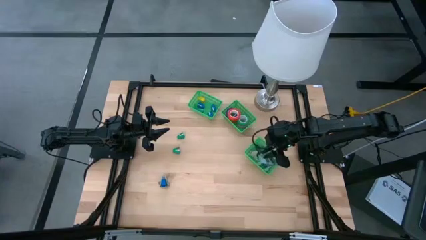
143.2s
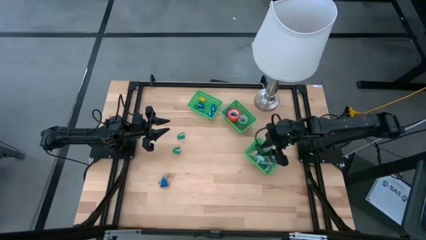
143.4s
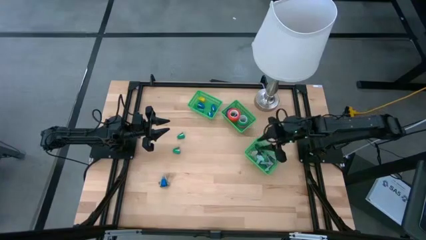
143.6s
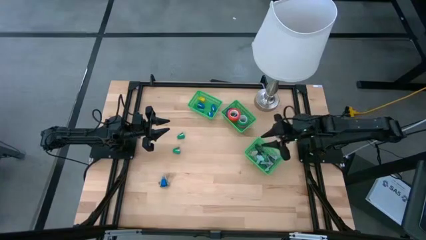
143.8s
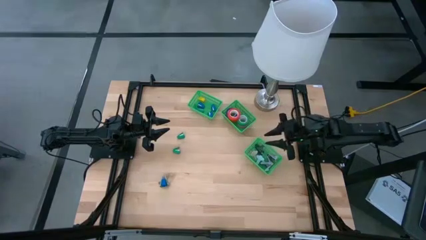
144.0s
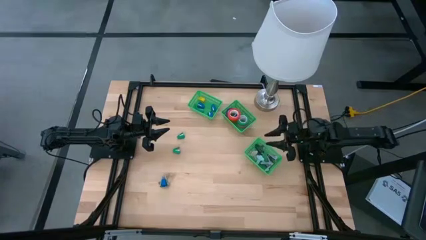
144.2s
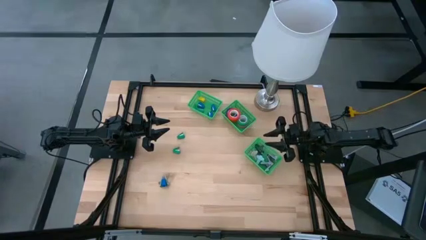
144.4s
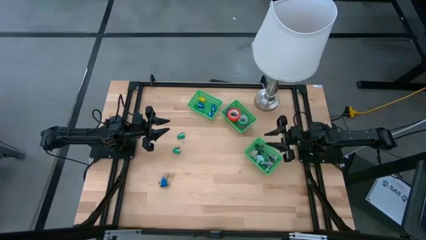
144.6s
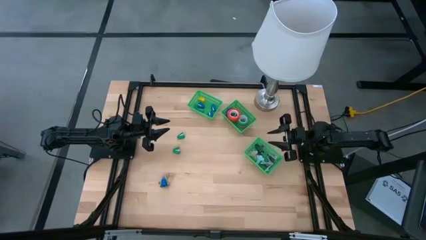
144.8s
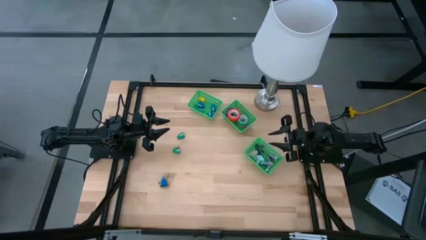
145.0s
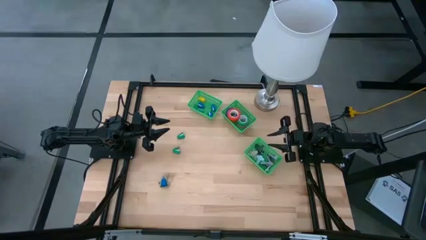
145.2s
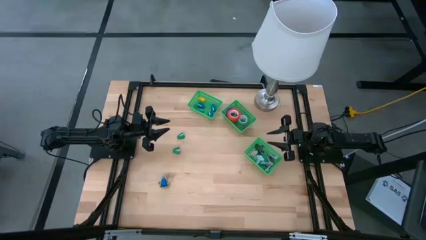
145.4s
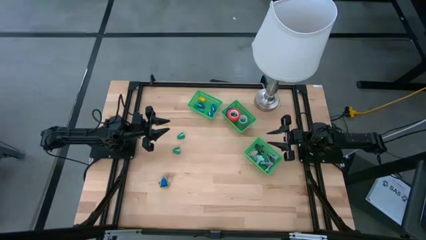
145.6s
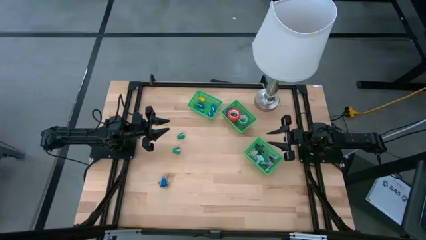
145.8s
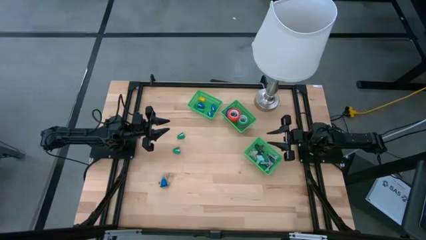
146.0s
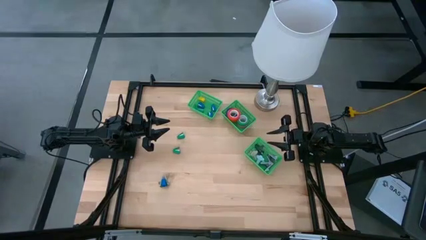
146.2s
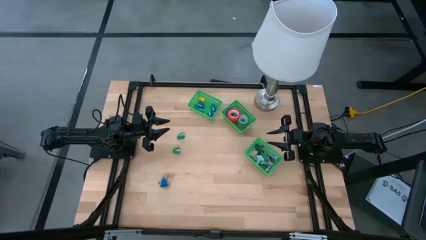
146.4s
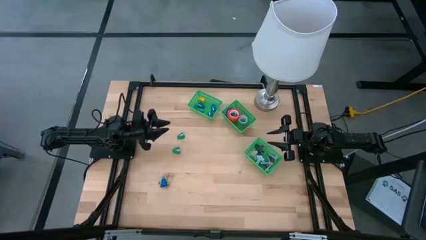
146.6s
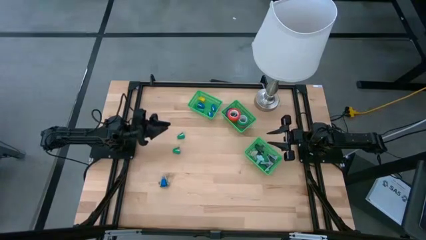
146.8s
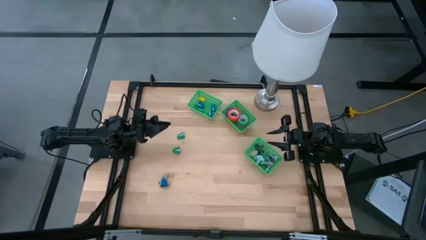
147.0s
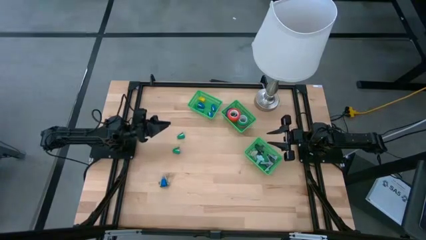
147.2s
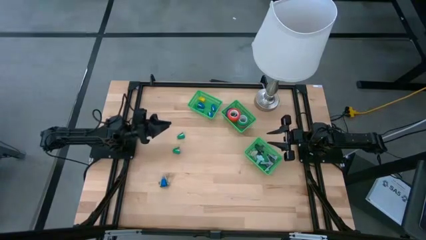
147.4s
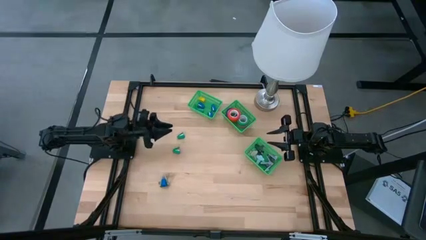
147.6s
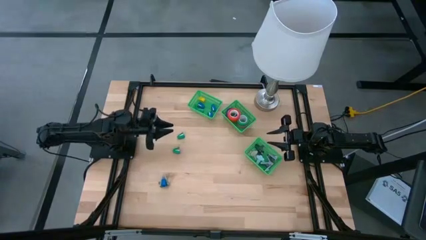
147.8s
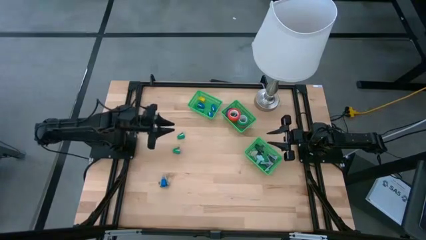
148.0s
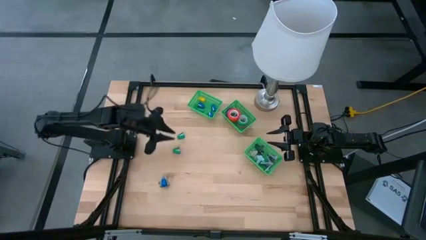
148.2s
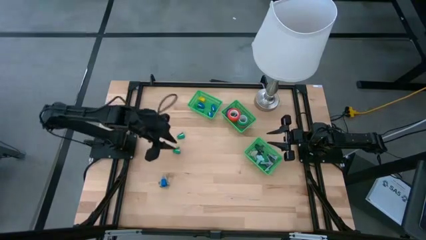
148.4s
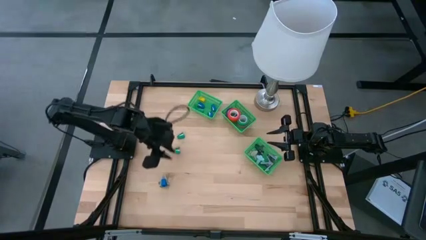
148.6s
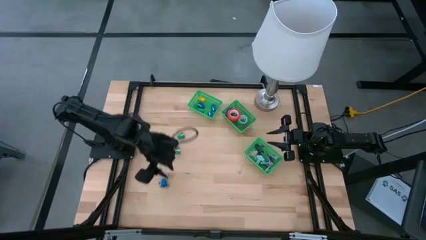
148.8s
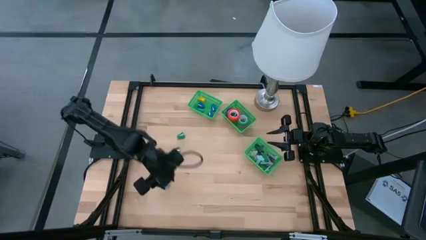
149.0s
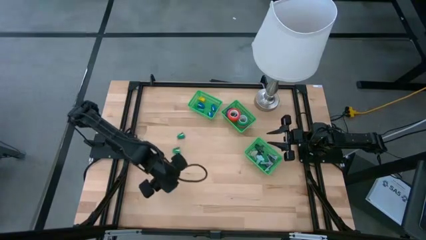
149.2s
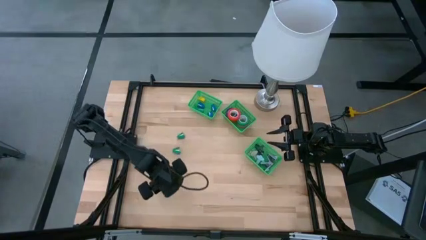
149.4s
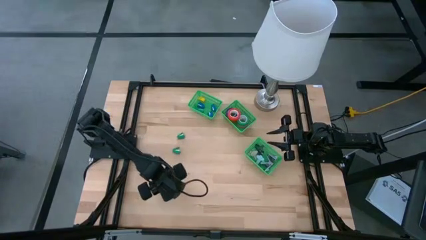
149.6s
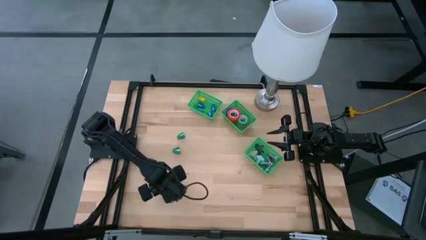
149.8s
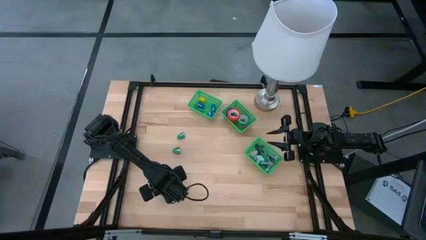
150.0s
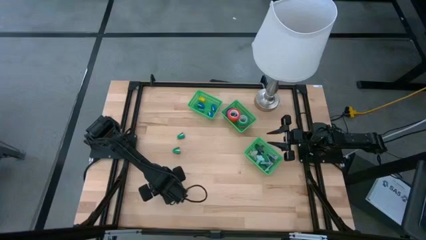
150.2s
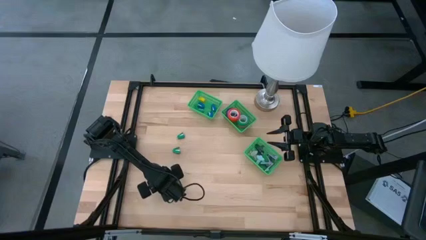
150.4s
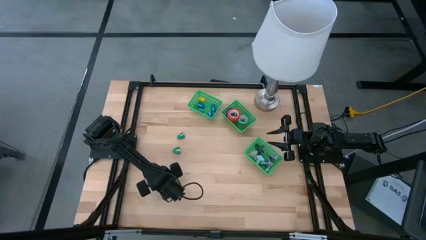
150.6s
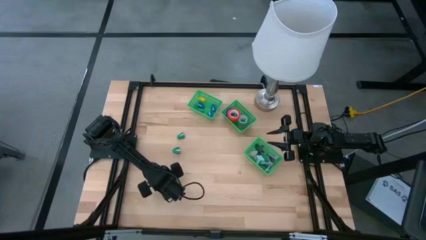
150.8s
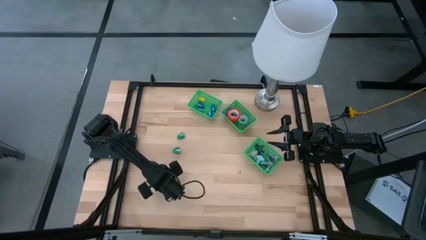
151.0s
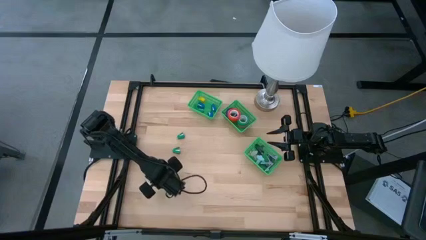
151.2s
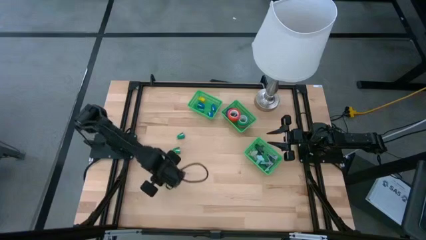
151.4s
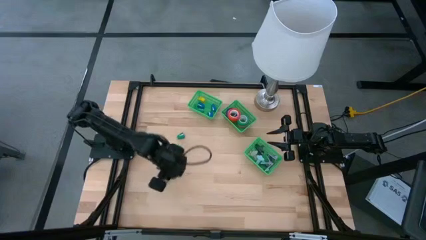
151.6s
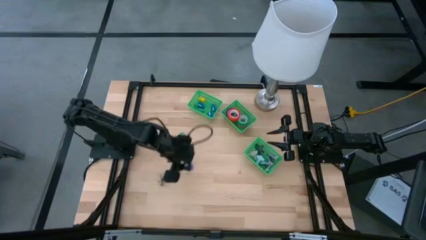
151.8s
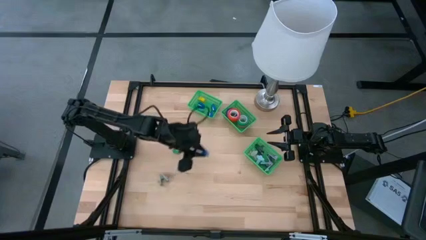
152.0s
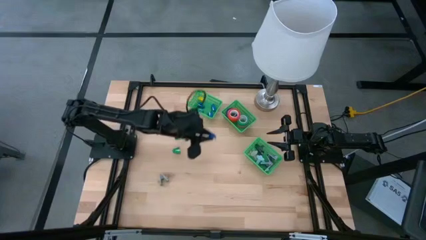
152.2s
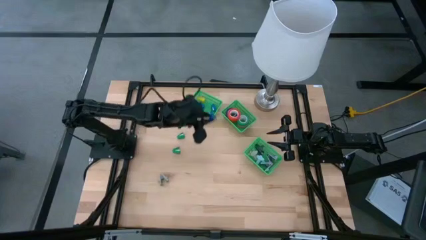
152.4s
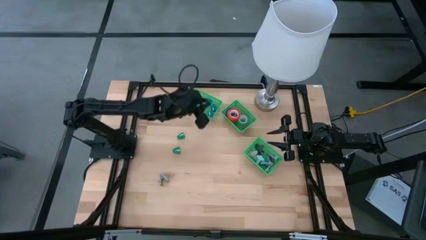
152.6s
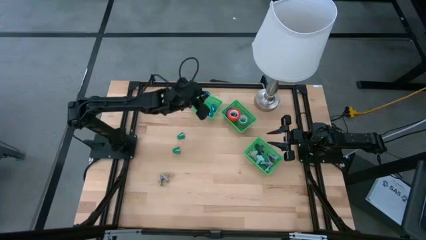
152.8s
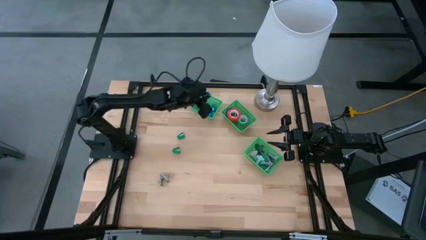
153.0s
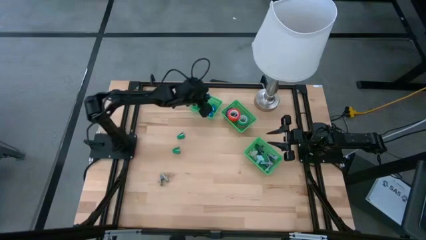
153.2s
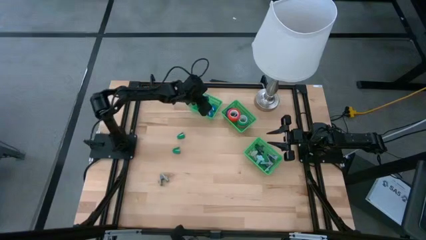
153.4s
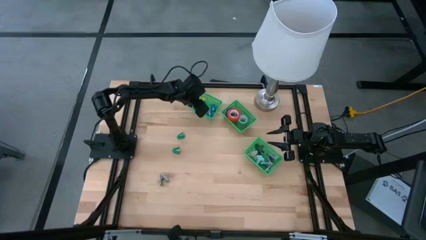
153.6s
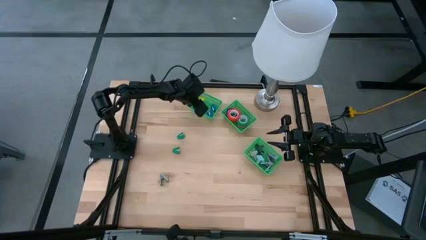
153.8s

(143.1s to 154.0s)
Task: Pick and place Stapler, Stapler remover, tape
Put the blue stapler into the top basket

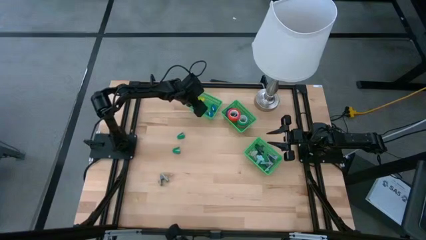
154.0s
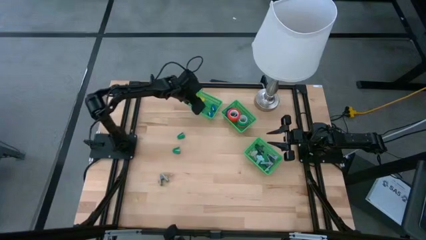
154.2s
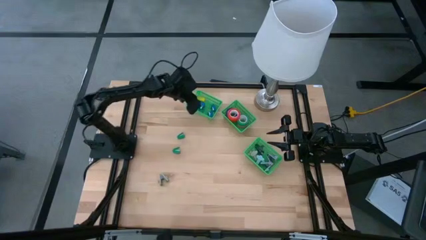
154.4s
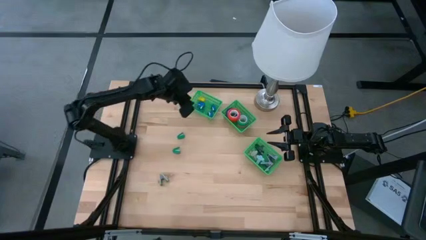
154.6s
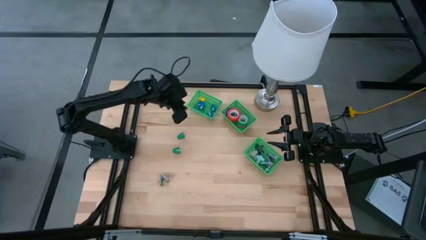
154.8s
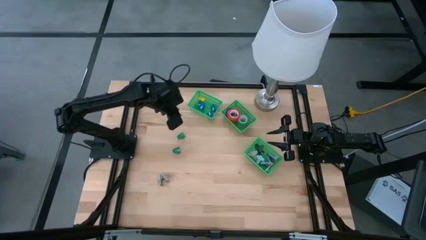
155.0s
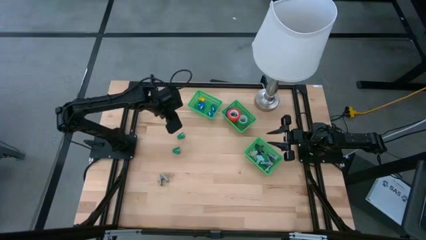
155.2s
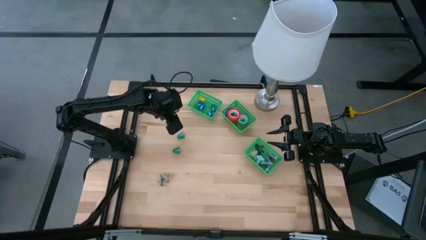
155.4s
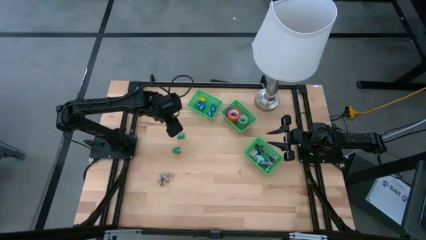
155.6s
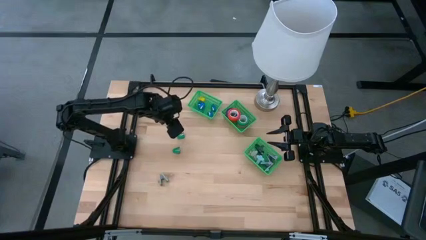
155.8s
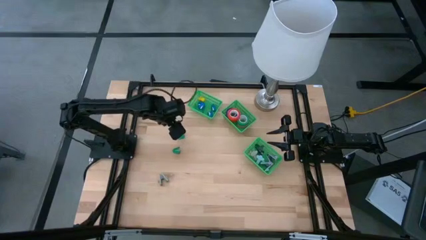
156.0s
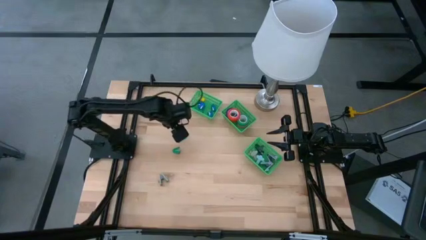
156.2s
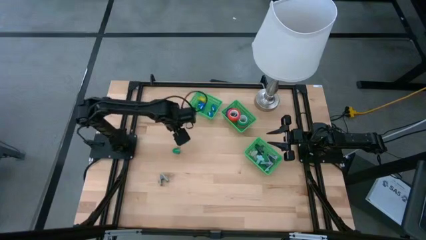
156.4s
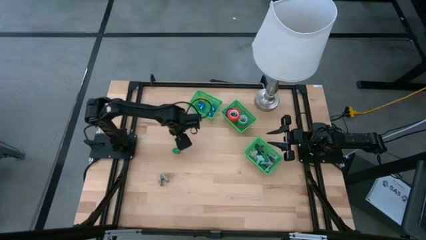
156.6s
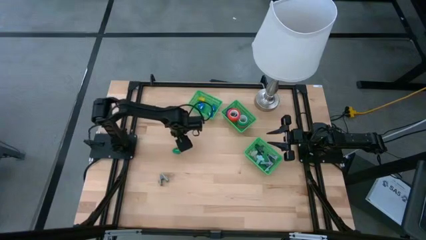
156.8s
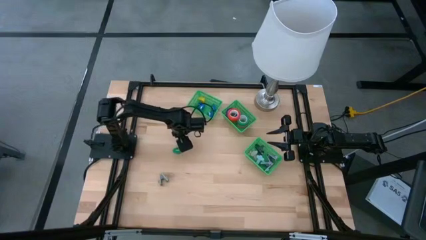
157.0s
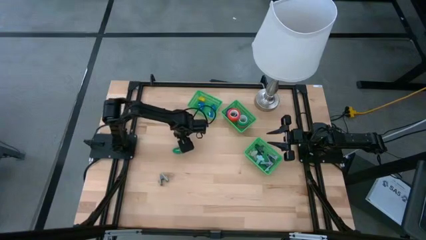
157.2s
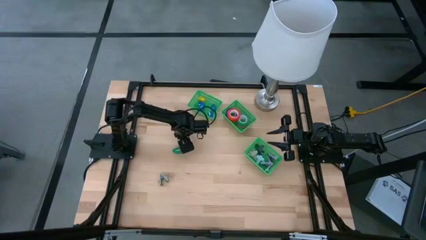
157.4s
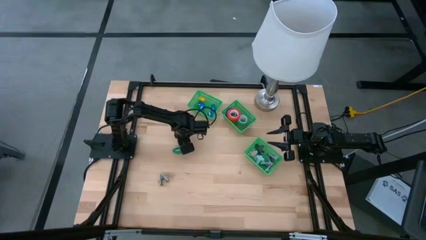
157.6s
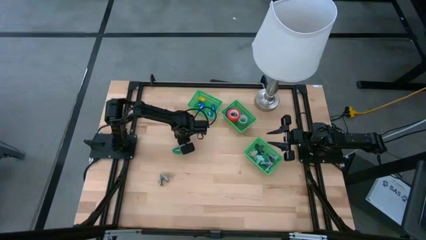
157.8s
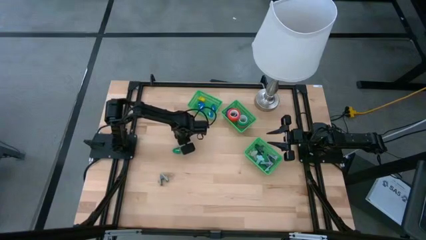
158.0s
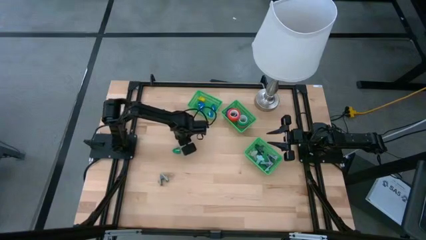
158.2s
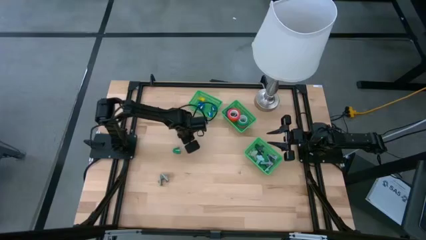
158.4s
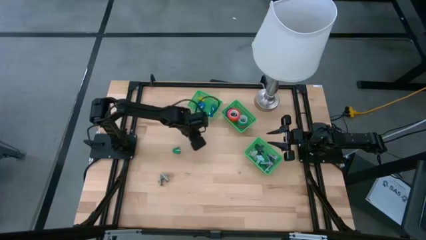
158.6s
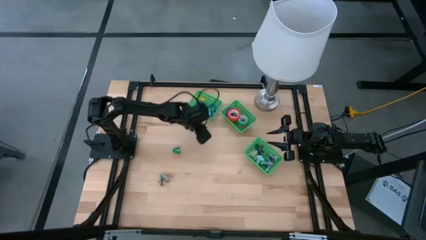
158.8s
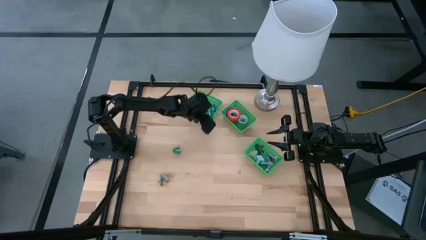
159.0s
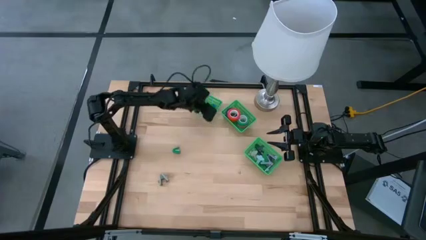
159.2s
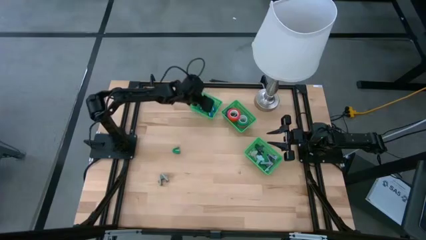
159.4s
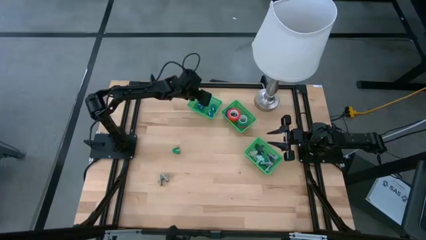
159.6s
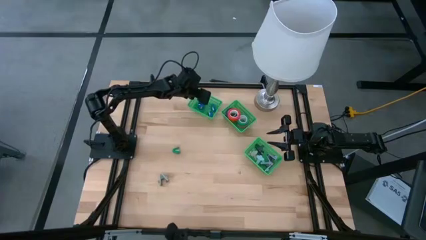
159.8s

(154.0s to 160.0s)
Put the top green stapler into the top basket
